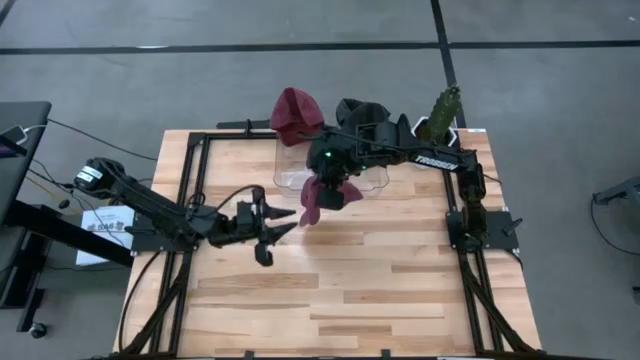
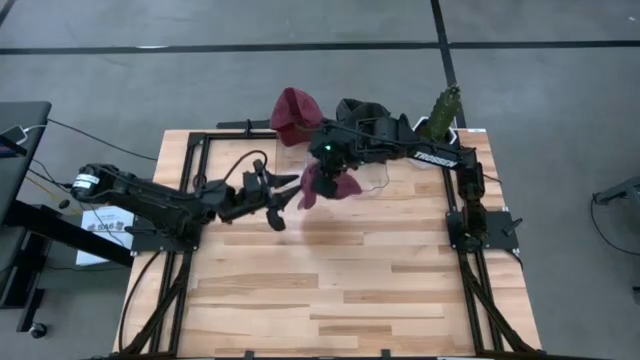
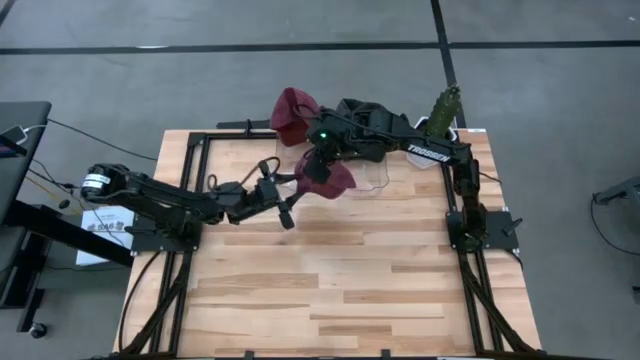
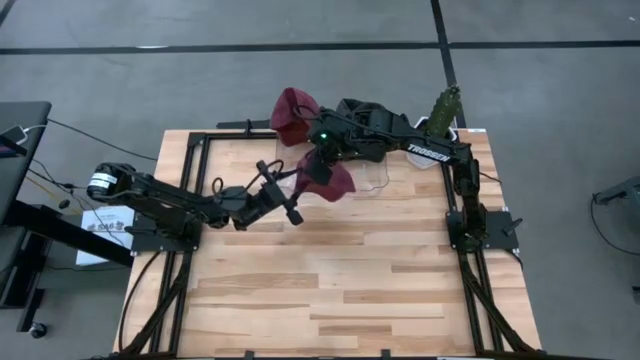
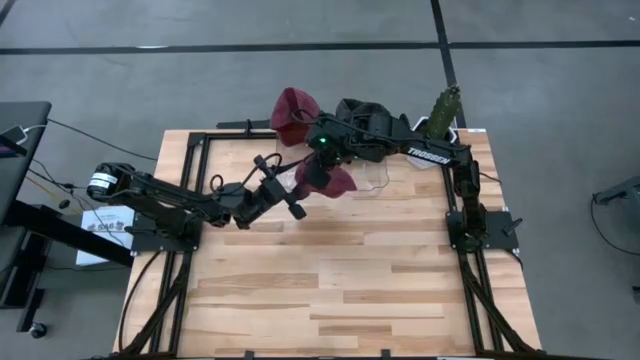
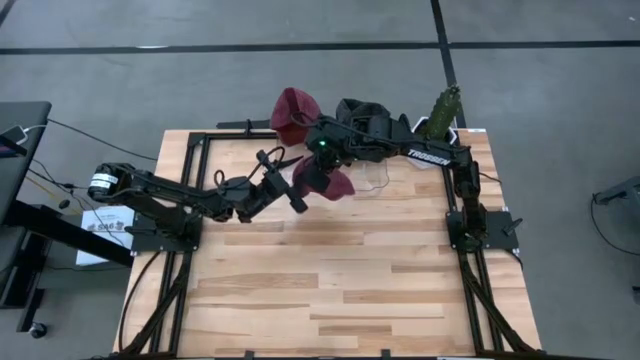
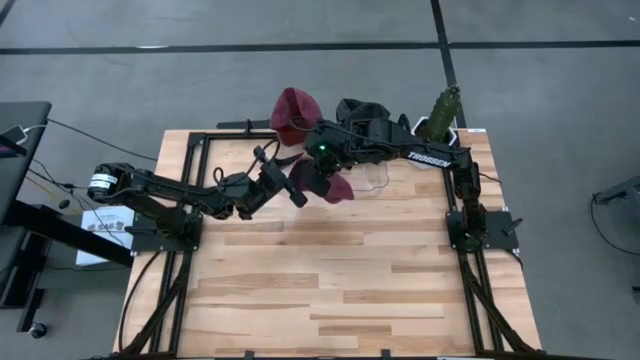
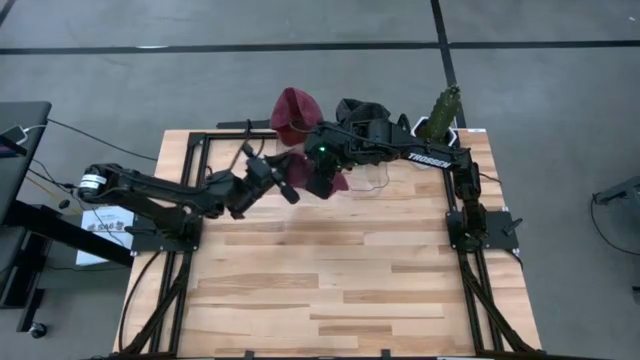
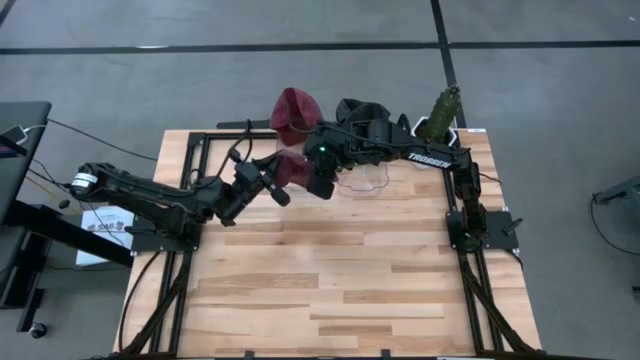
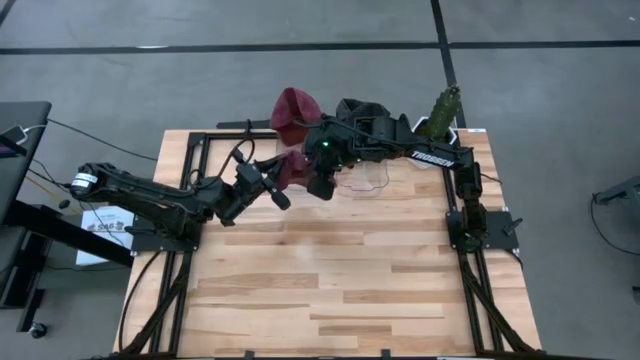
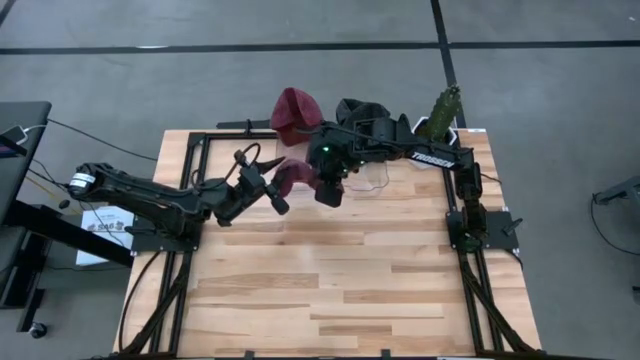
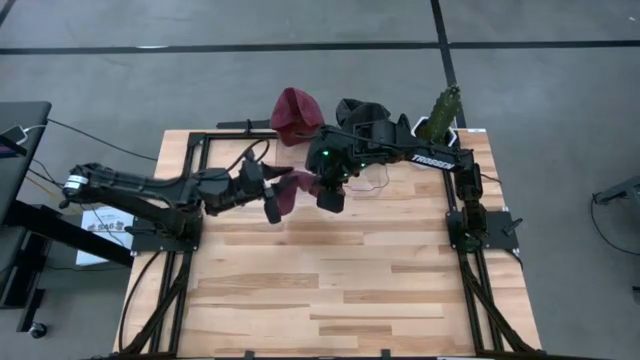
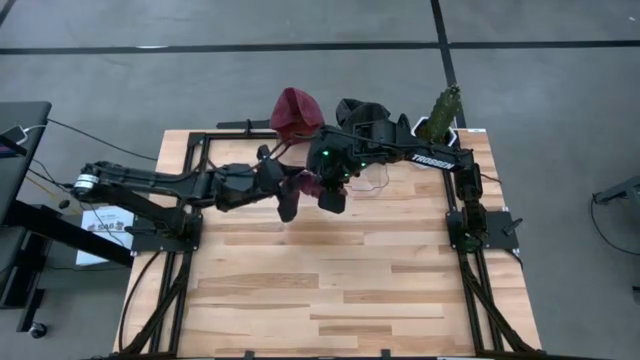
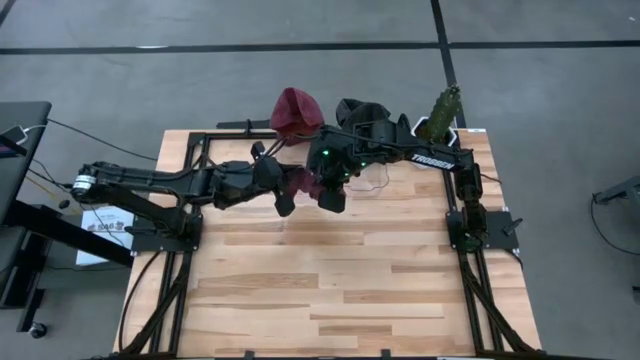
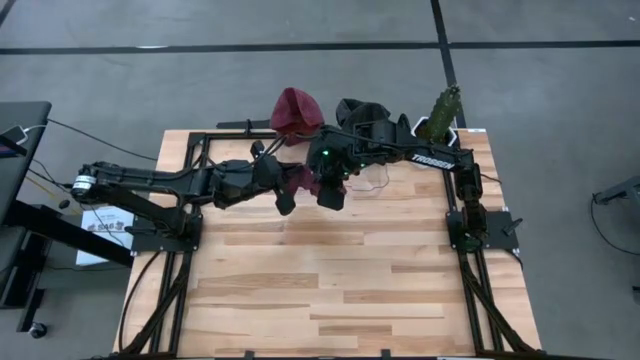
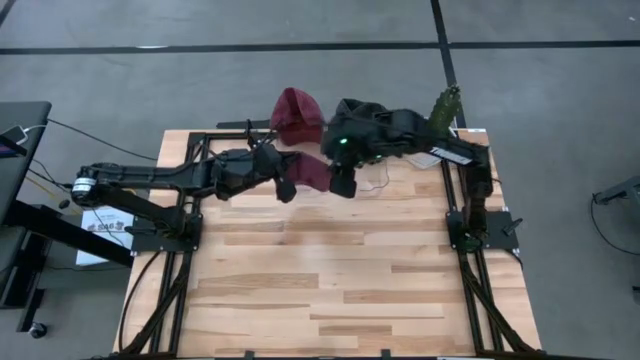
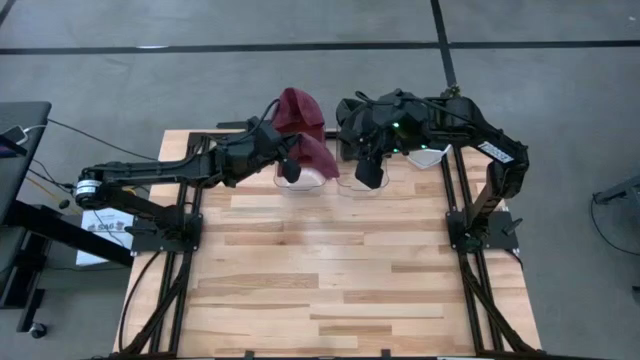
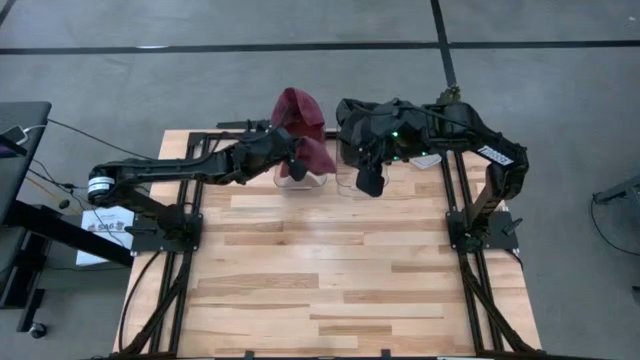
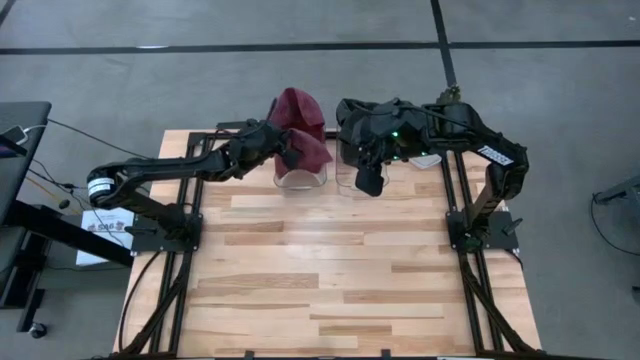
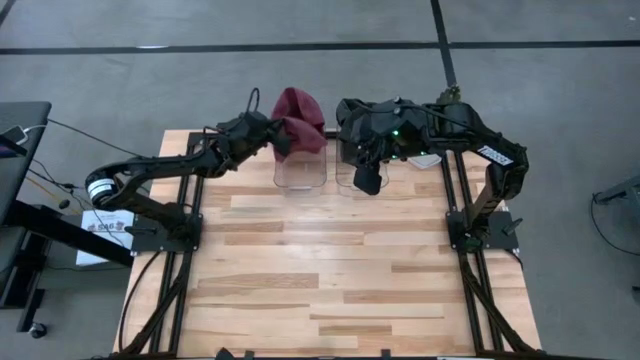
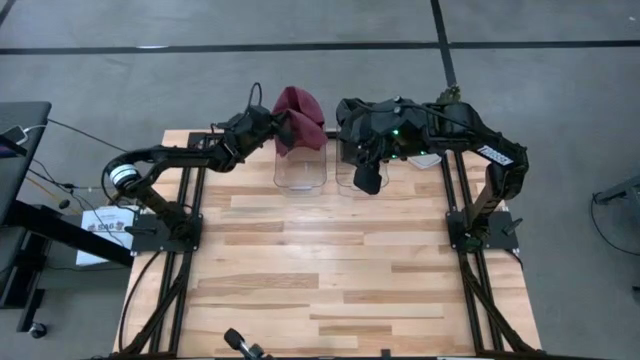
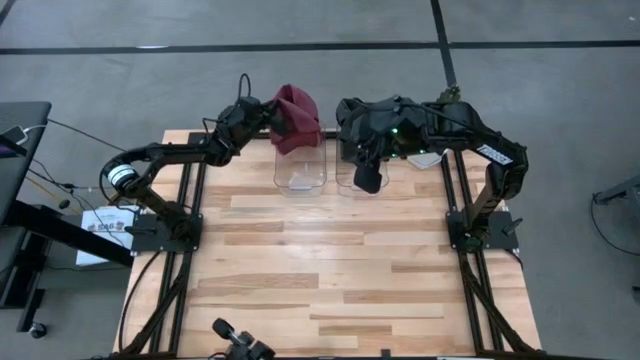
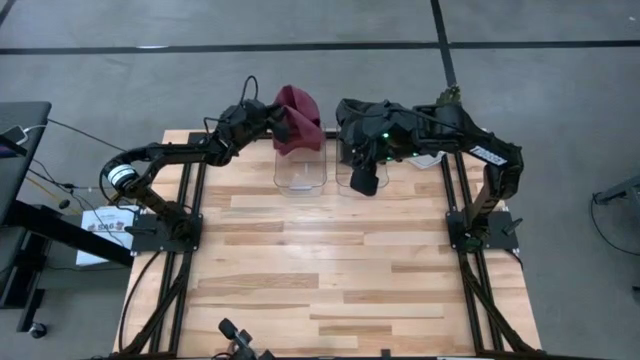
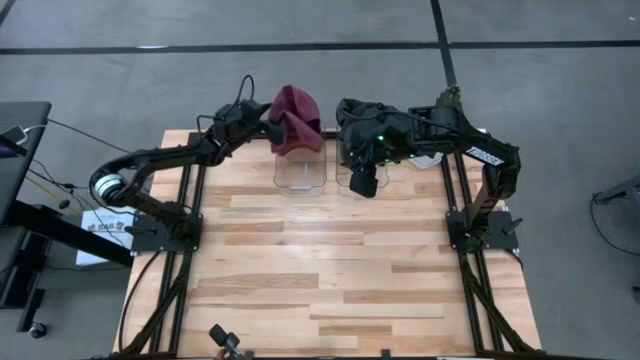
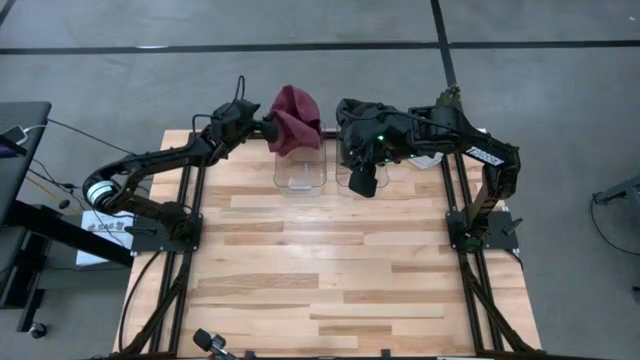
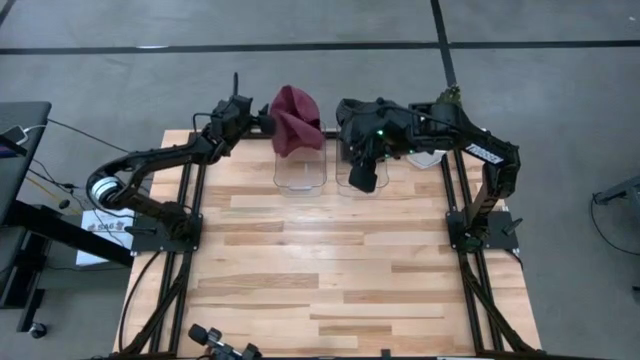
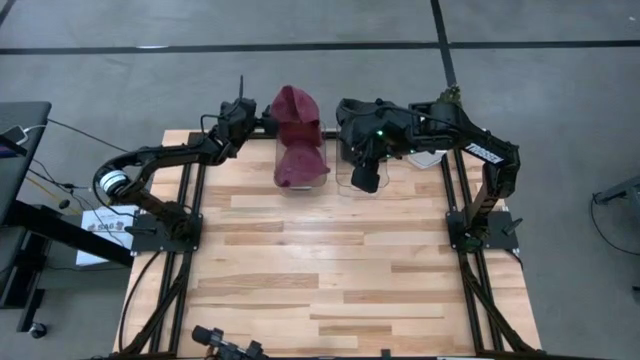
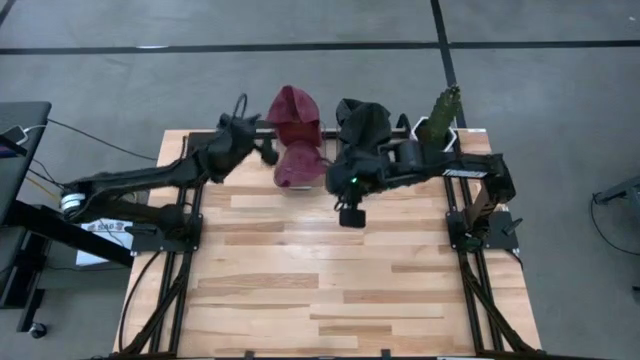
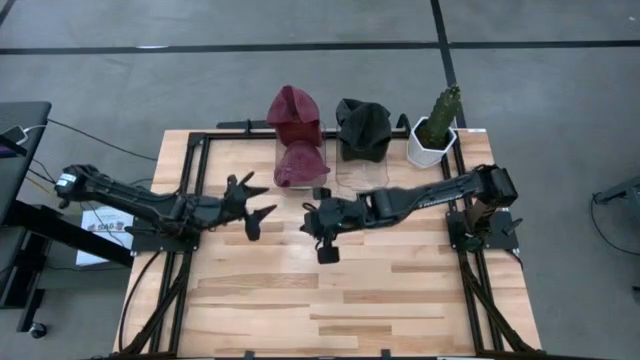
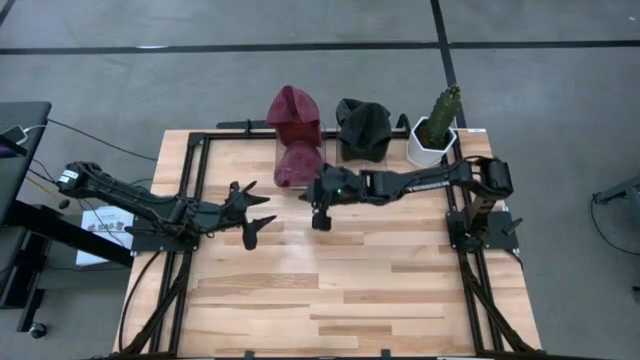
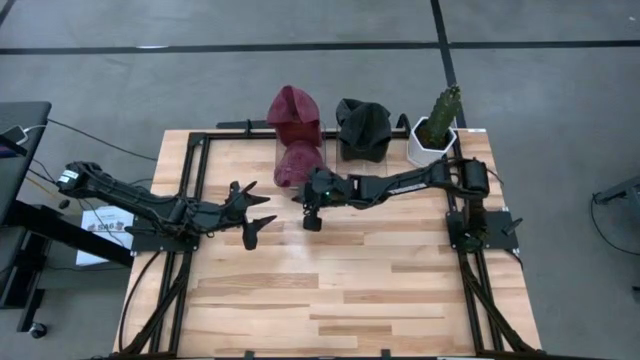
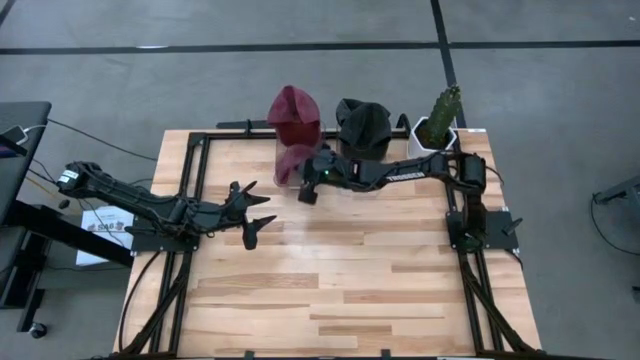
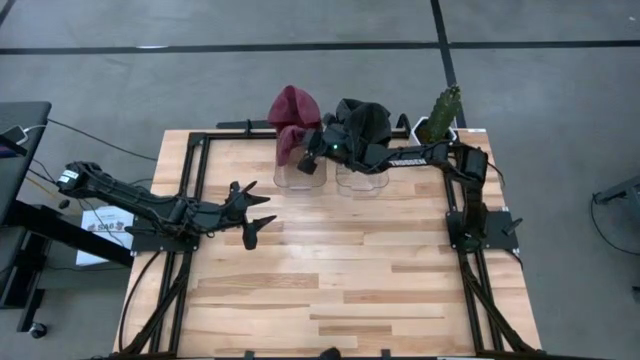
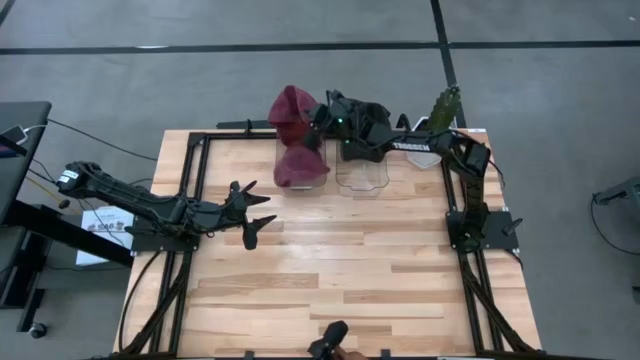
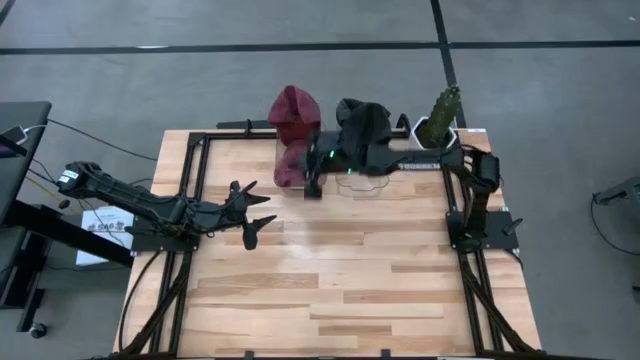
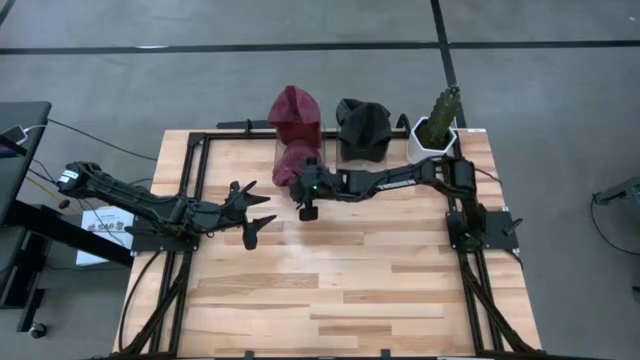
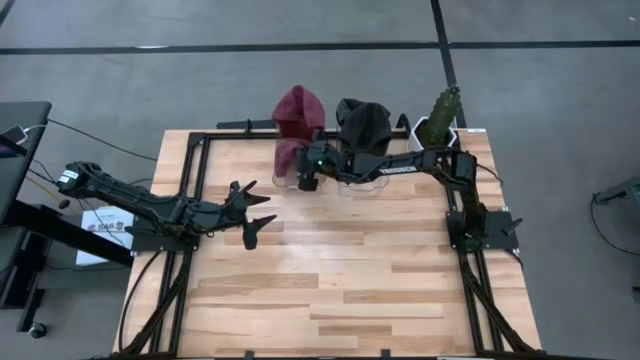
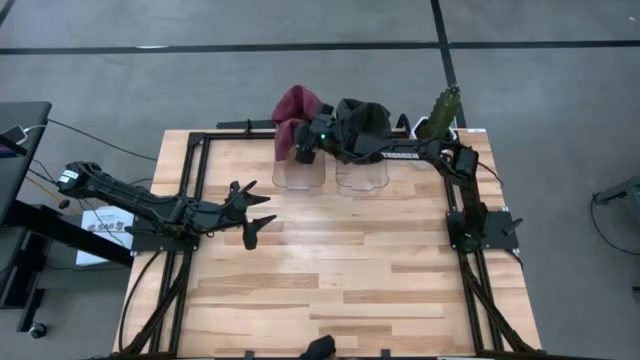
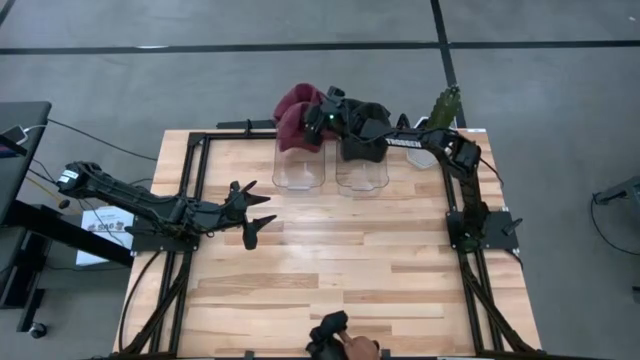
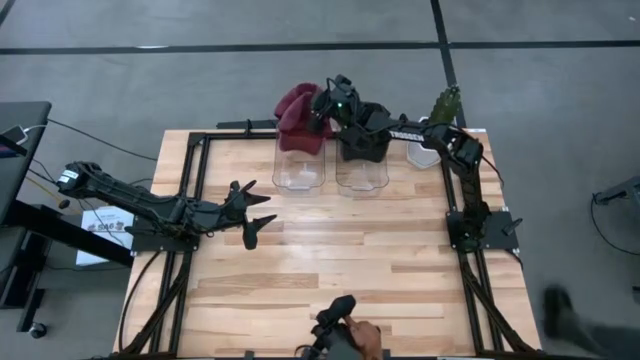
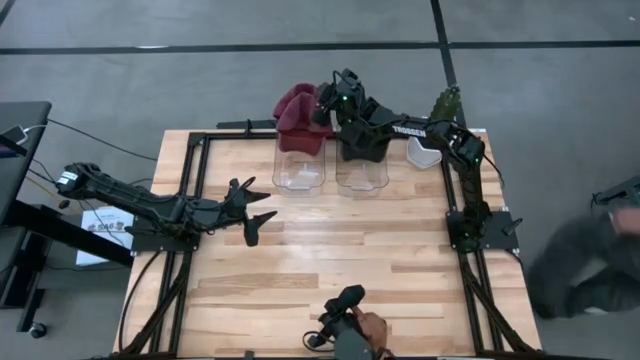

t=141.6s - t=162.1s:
Task: Pick & Place hat
Put the red cap into the left transparent bin
